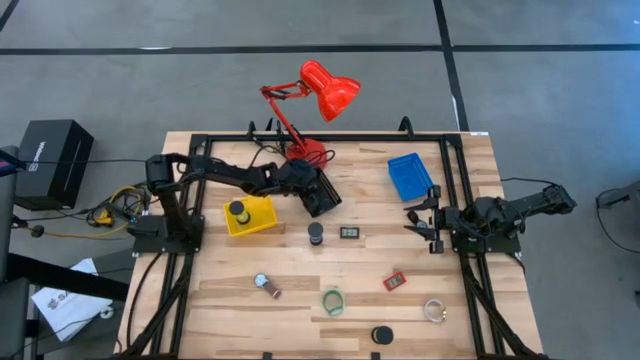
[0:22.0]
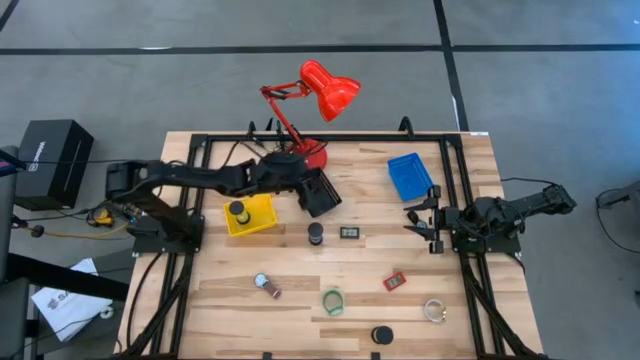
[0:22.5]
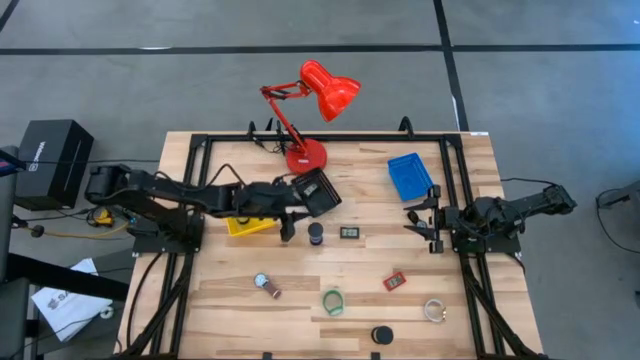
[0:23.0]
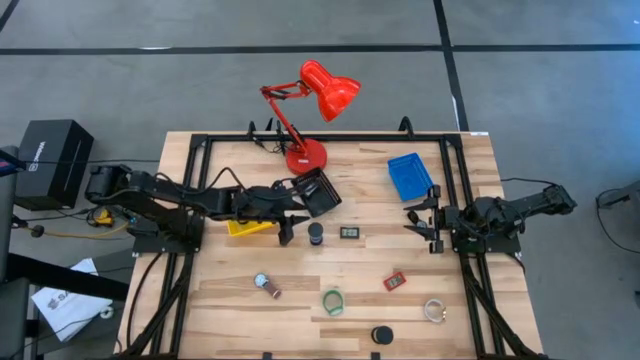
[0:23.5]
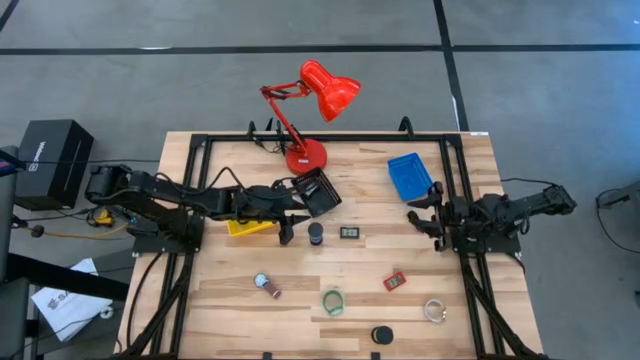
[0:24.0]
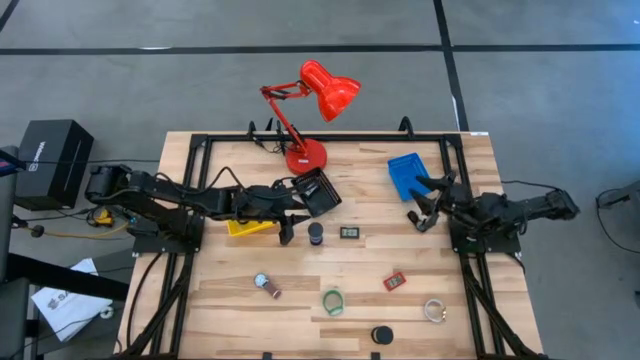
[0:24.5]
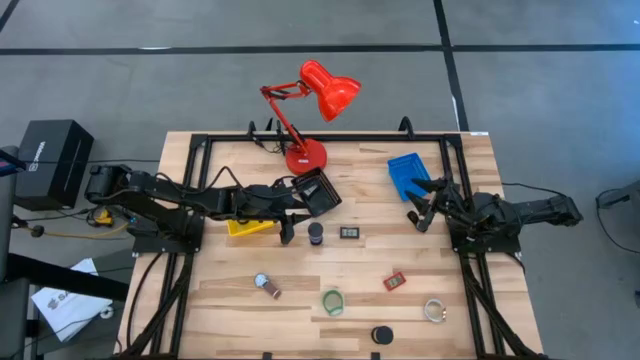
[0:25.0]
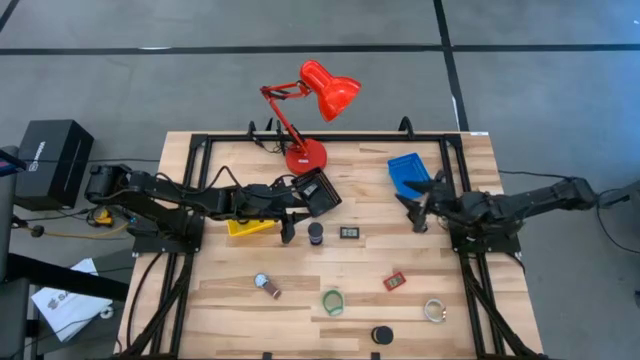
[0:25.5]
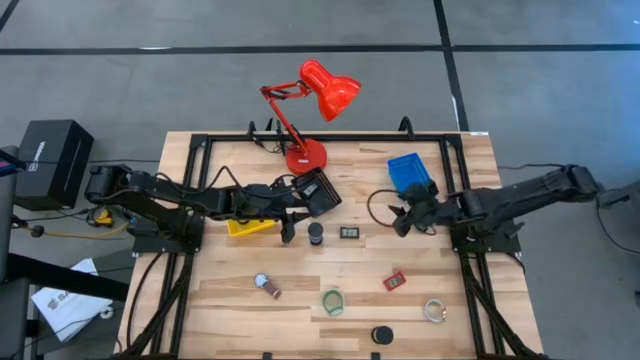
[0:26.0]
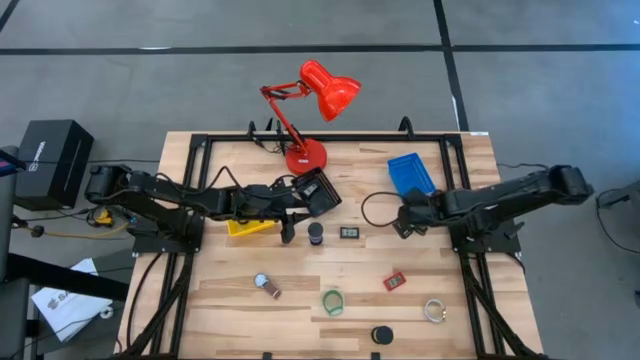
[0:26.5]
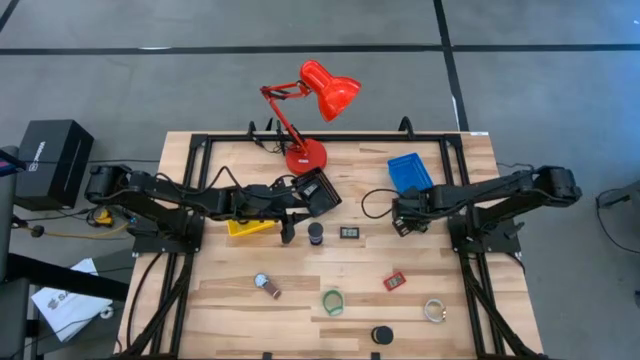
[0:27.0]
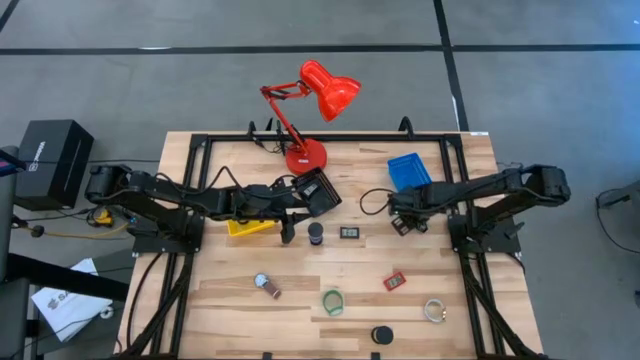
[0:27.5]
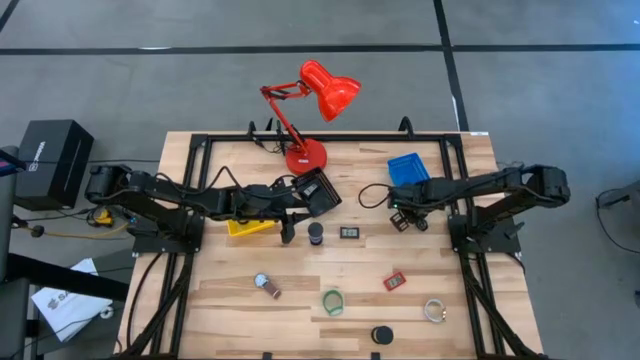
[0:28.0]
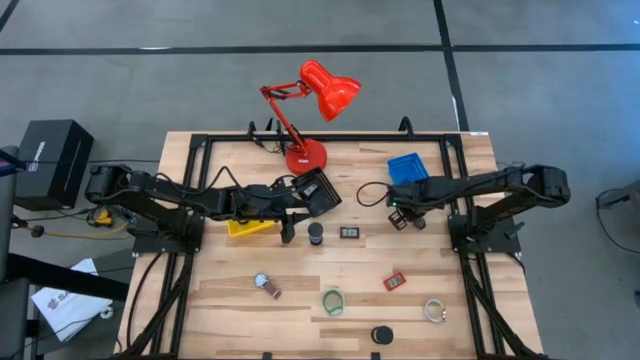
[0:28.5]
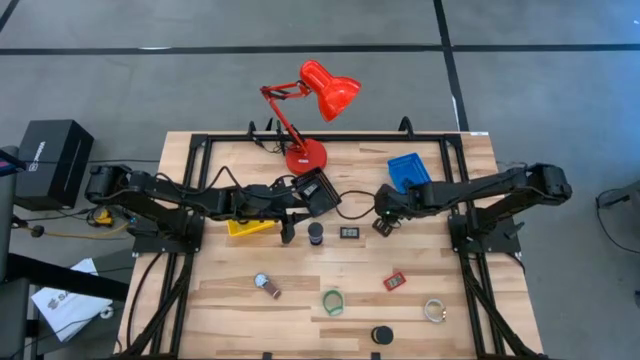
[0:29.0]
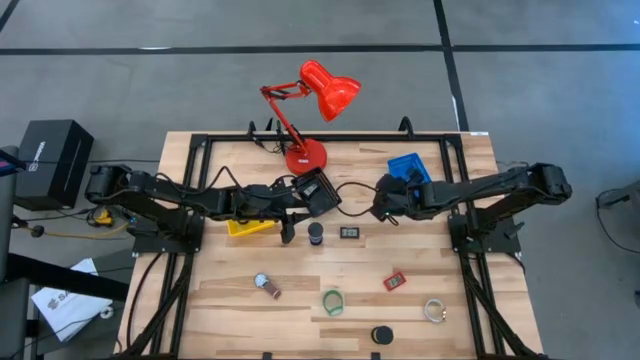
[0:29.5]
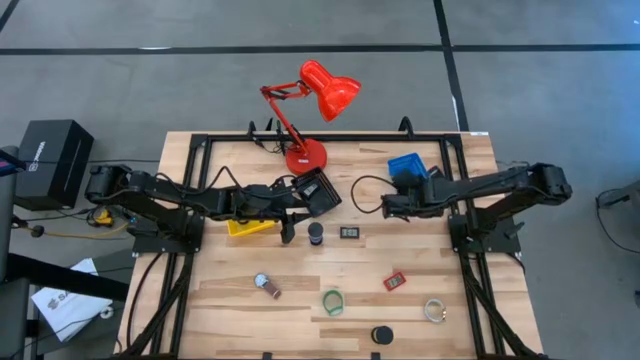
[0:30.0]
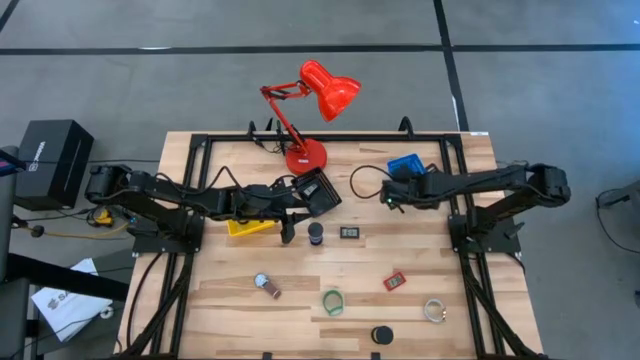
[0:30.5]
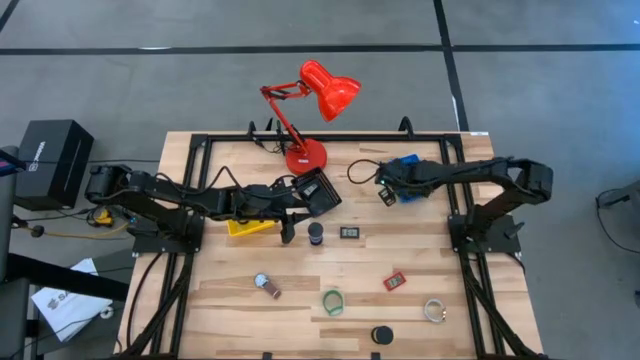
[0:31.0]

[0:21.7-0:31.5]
Task: Pick & Place Office items
Put the black wrist watch into the blue bin

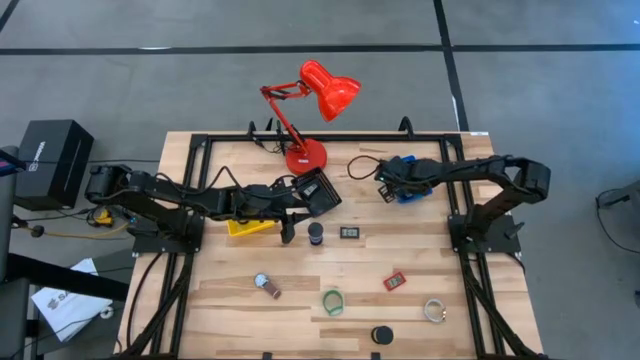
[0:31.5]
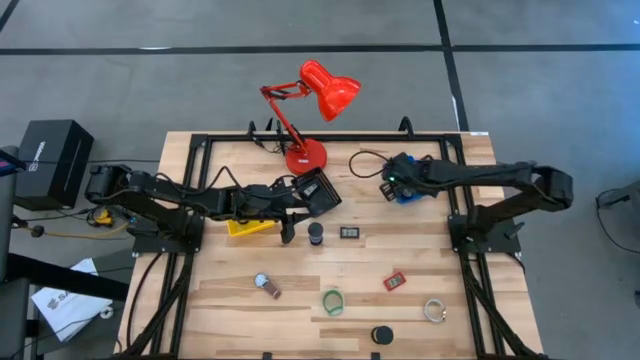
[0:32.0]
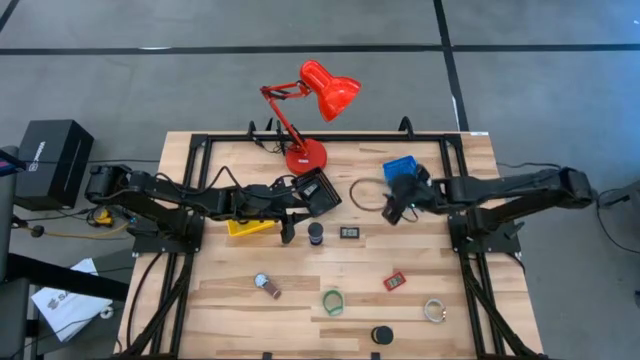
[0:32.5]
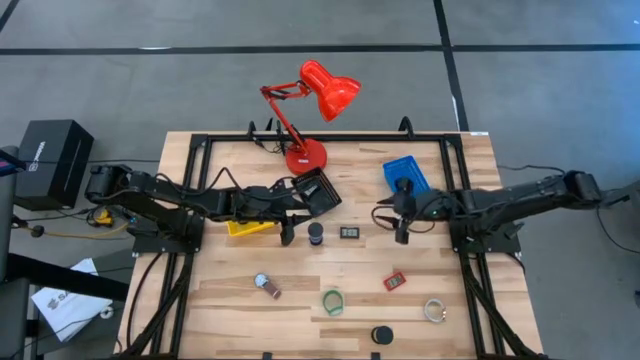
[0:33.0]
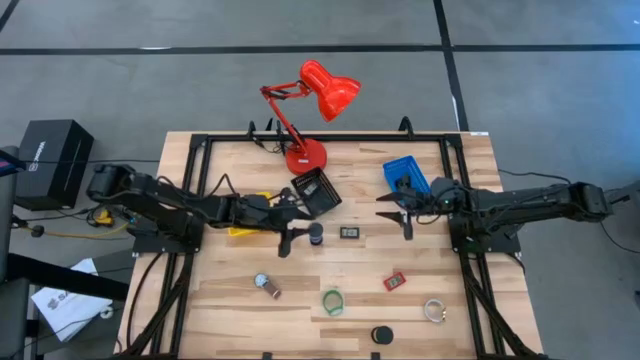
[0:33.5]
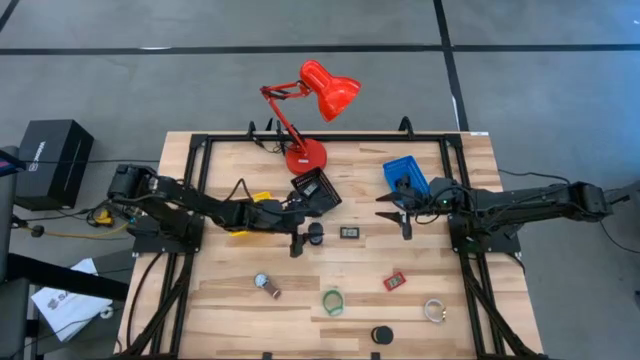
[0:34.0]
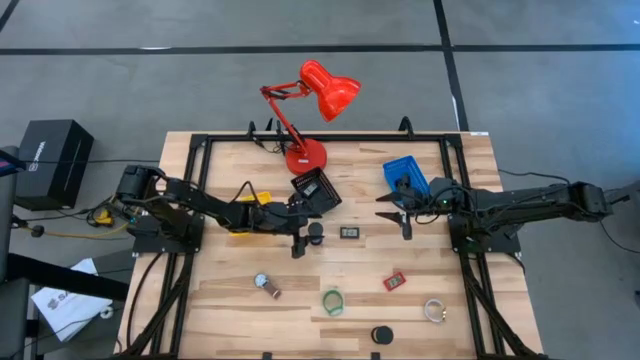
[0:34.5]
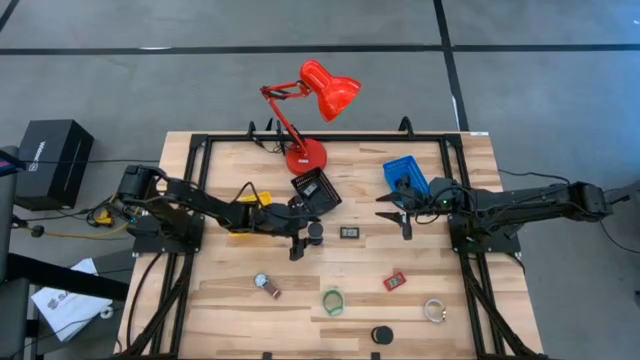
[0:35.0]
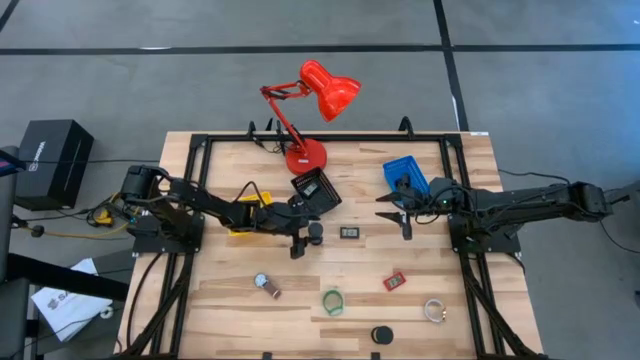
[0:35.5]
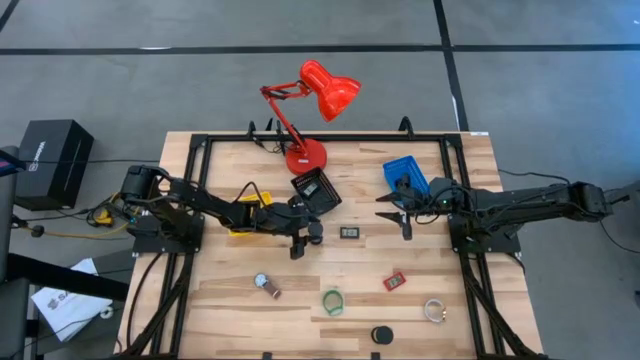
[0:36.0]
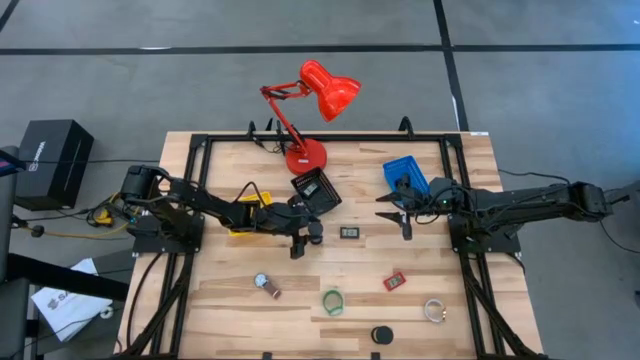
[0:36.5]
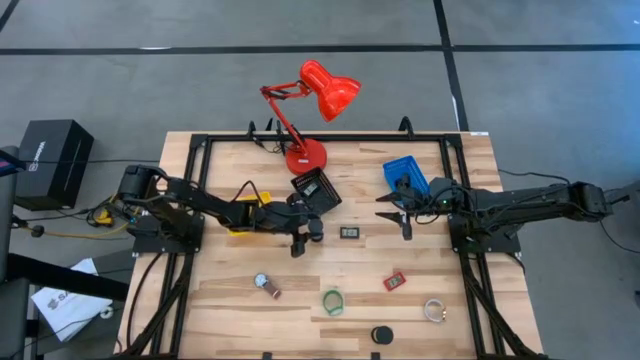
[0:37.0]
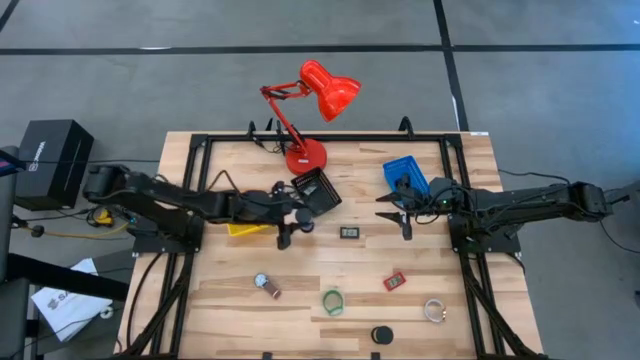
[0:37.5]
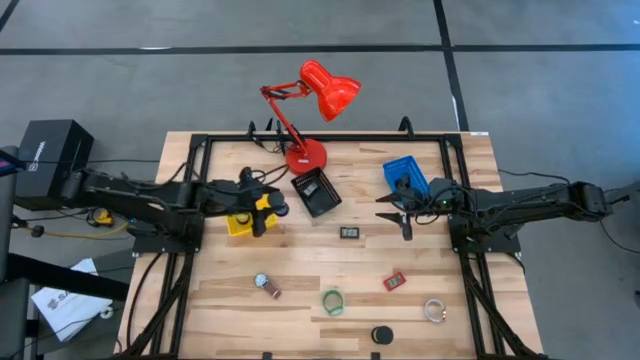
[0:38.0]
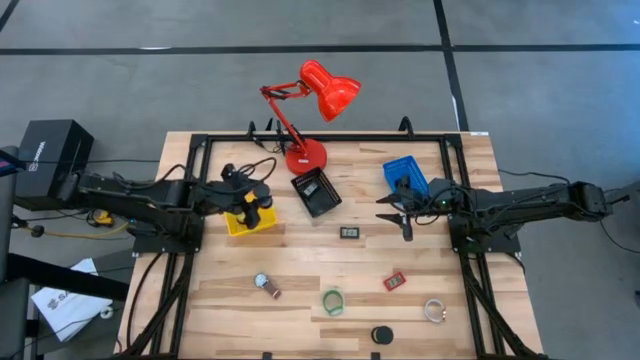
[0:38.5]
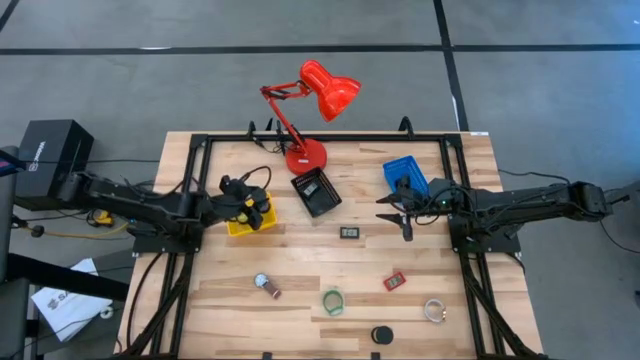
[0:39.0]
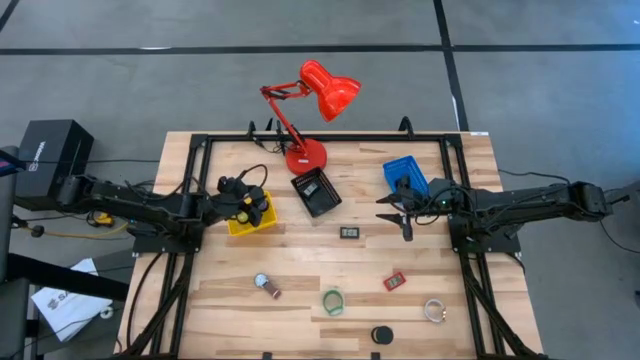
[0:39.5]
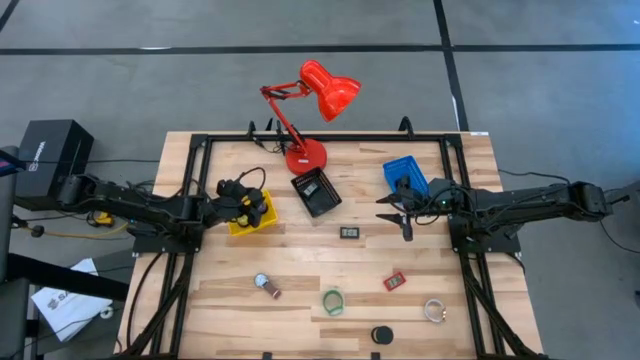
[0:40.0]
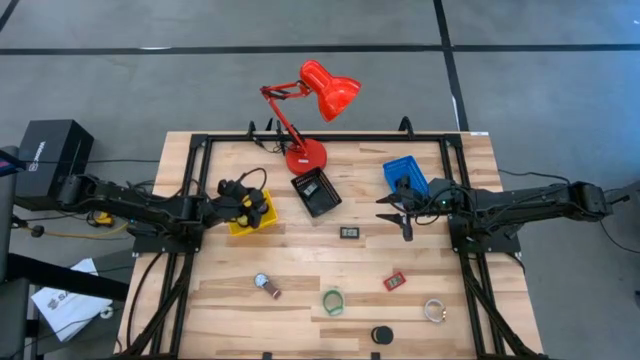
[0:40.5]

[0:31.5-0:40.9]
Put the blue hourglass into the yellow bin
